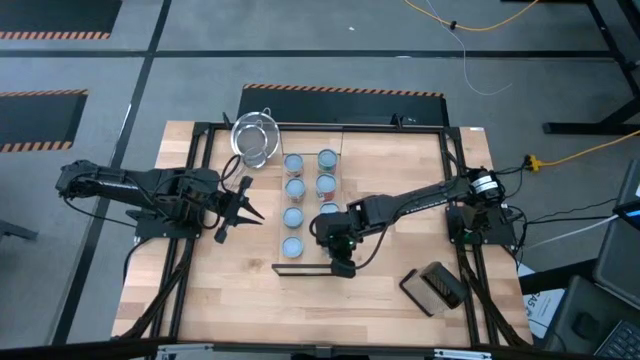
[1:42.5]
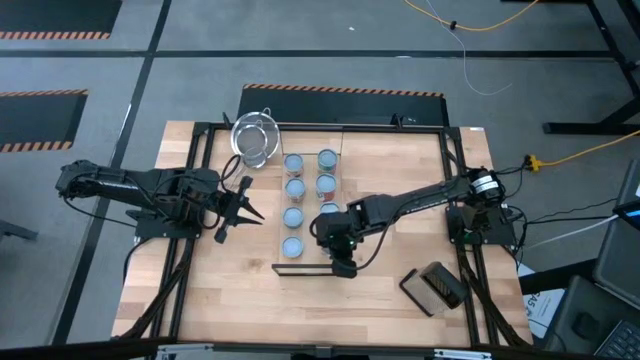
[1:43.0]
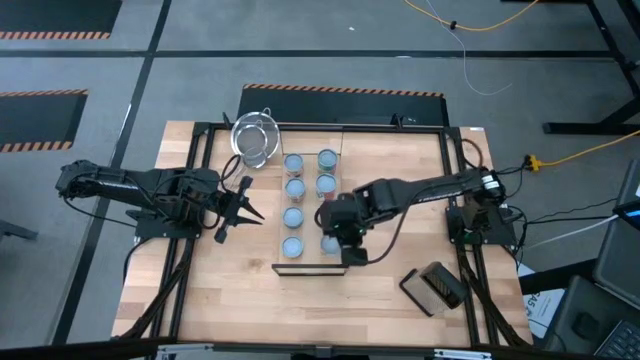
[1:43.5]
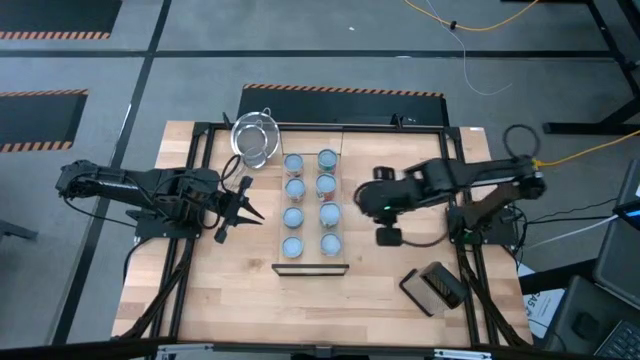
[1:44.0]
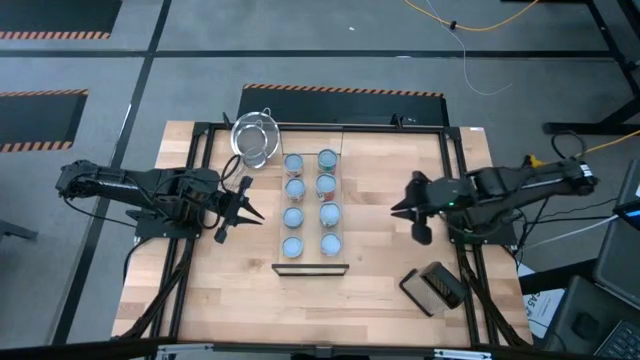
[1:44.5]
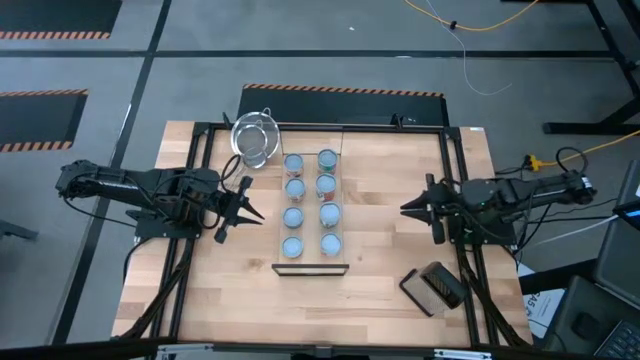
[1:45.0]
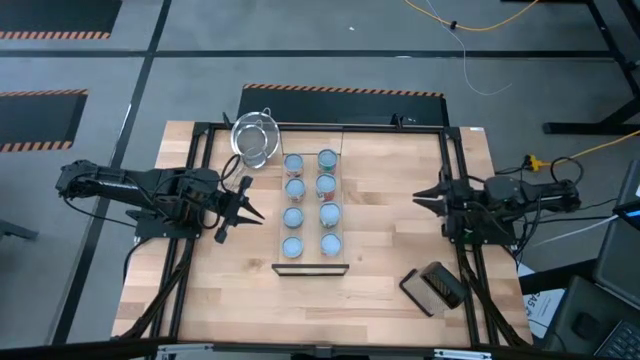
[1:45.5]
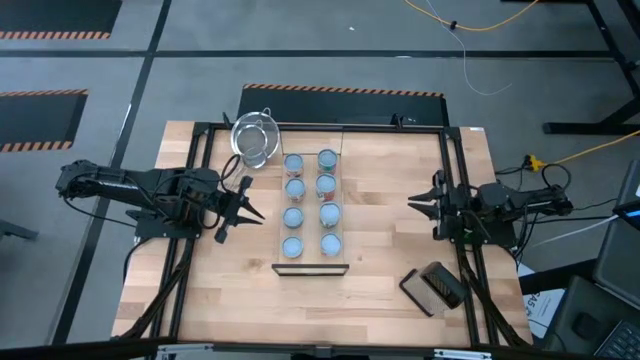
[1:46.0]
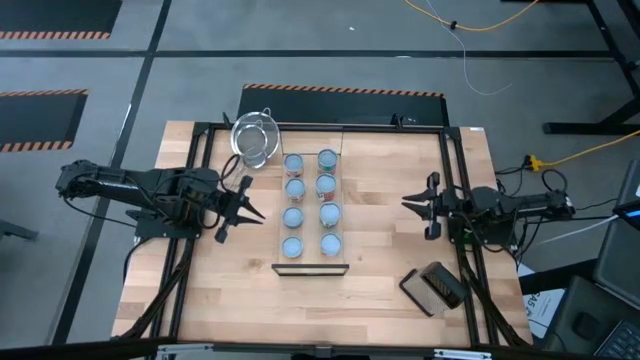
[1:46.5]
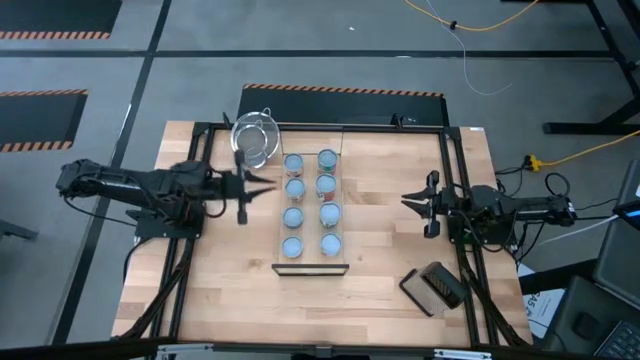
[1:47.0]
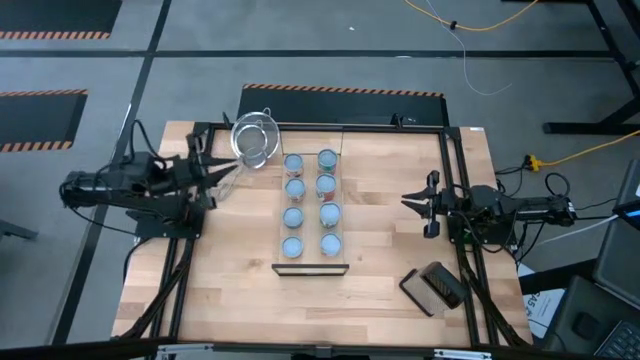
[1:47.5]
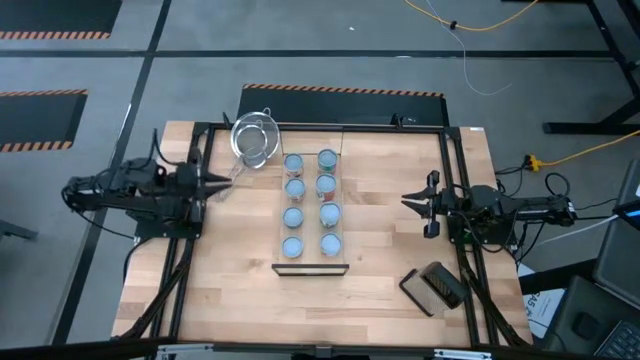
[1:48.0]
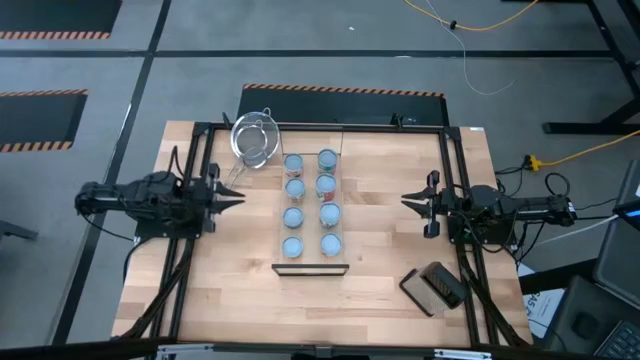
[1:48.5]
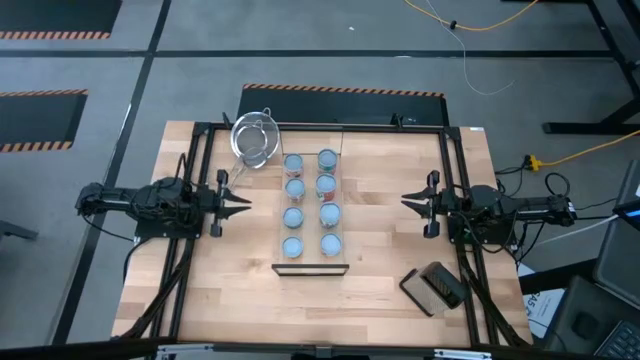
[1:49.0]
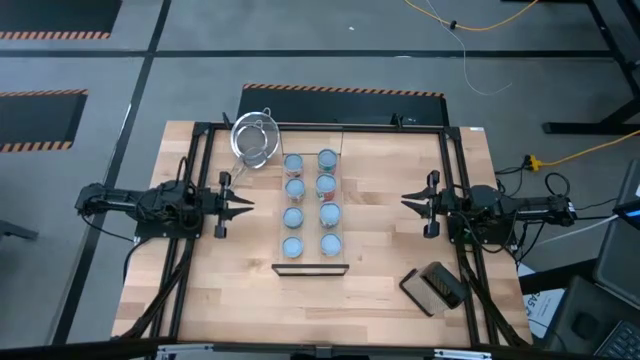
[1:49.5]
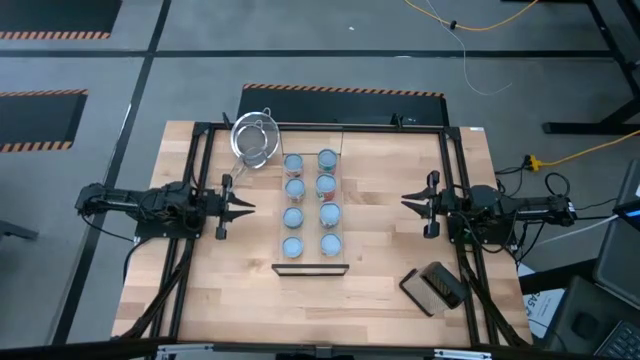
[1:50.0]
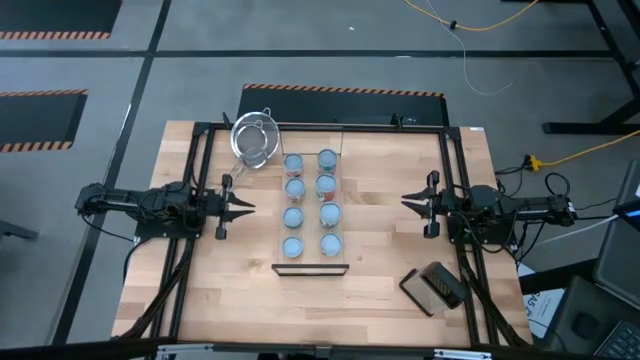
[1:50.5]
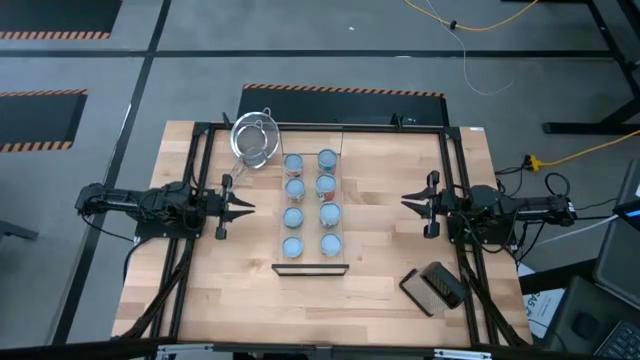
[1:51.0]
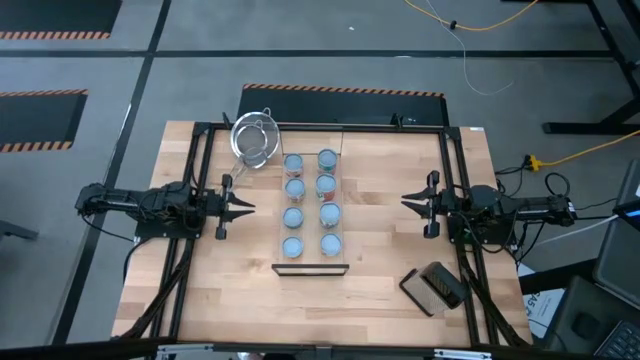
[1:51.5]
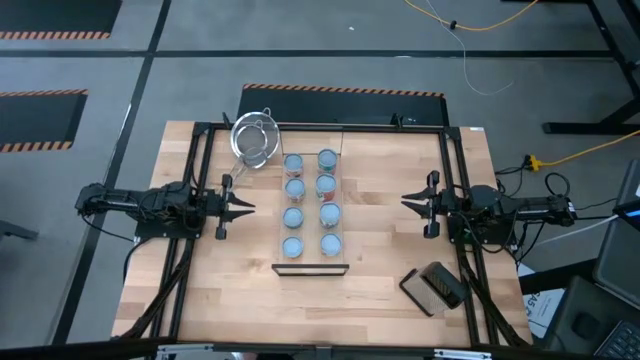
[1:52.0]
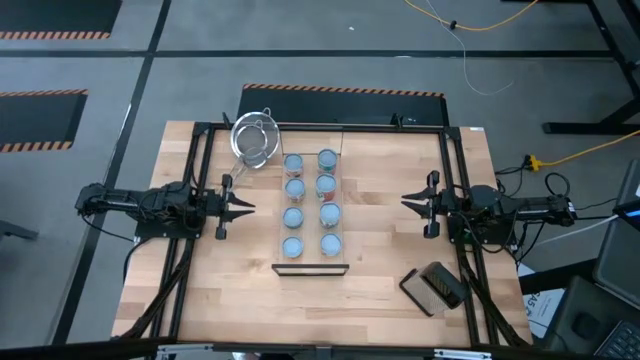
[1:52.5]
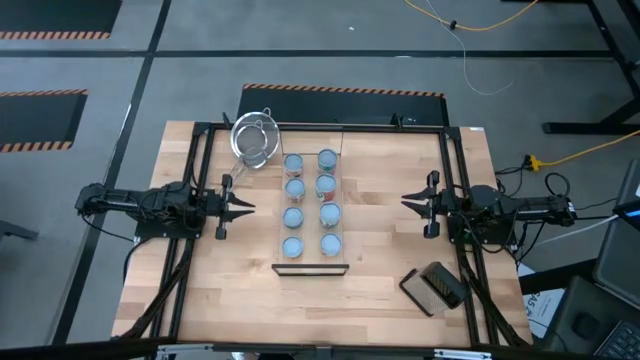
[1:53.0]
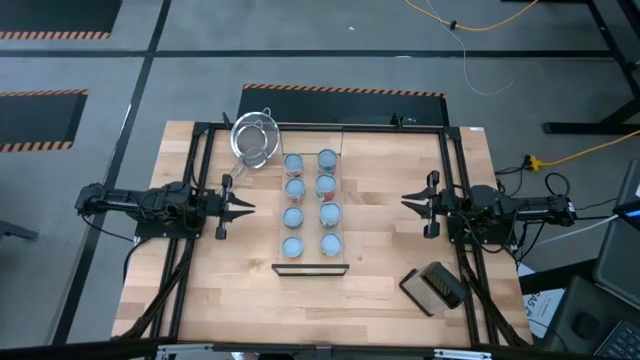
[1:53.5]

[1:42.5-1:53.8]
Task: Pick and place cans onto a shelf
Return to Home Position

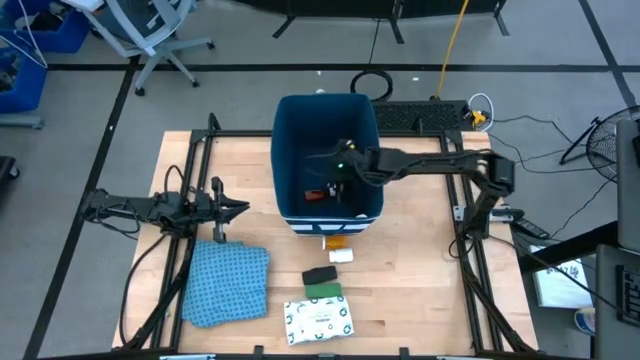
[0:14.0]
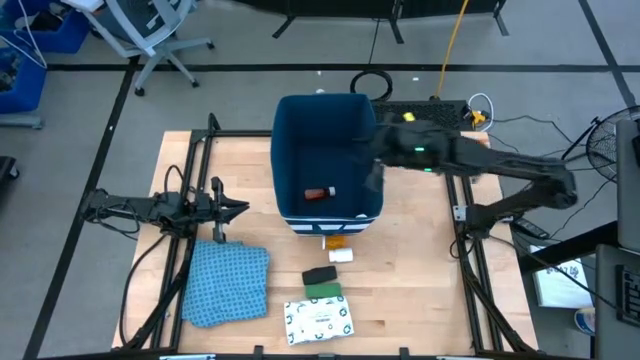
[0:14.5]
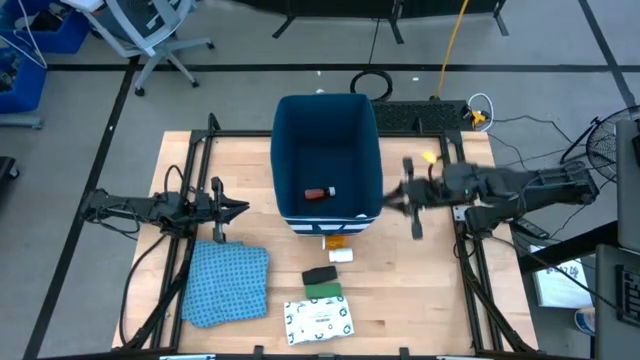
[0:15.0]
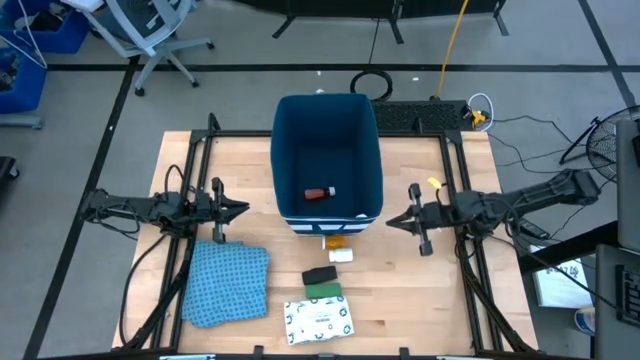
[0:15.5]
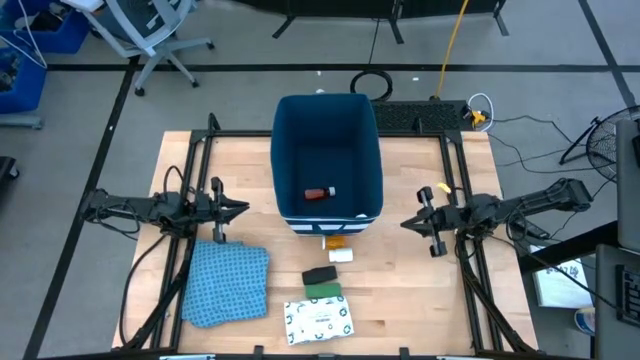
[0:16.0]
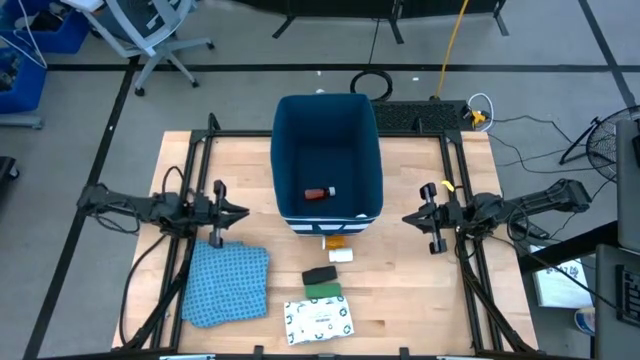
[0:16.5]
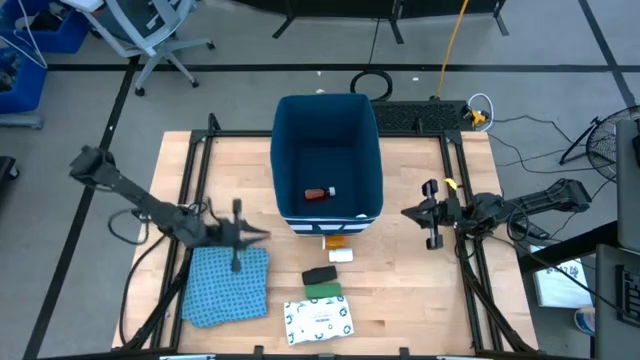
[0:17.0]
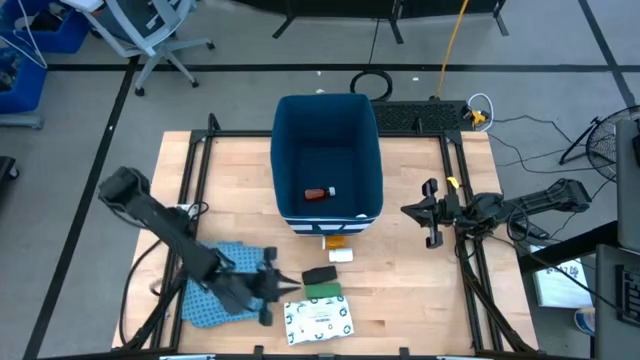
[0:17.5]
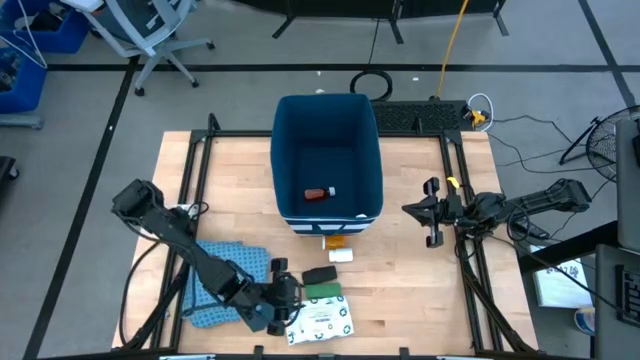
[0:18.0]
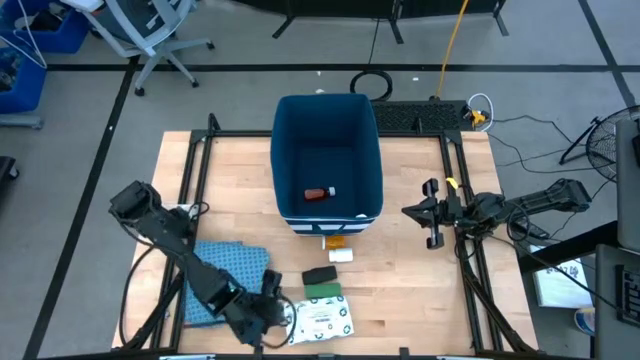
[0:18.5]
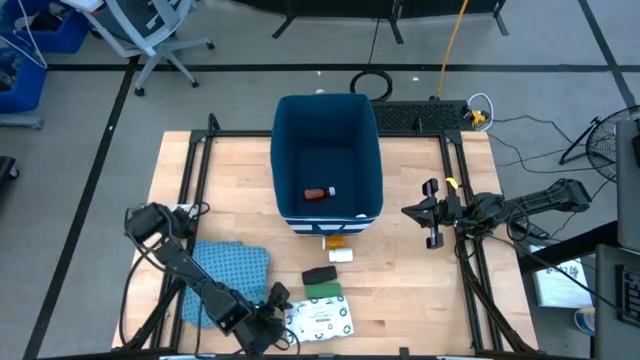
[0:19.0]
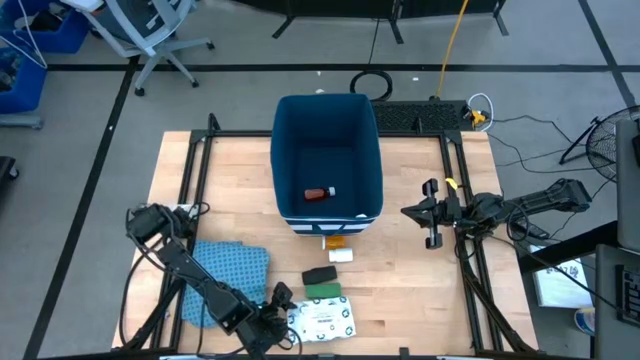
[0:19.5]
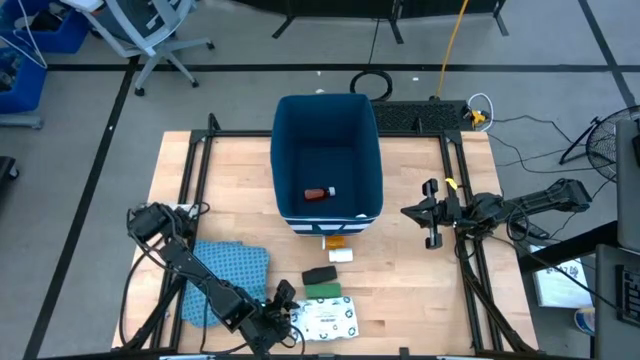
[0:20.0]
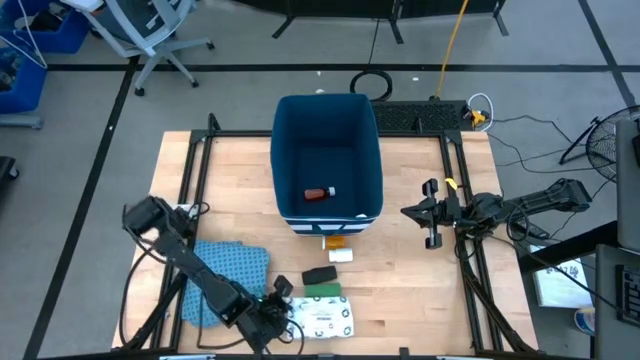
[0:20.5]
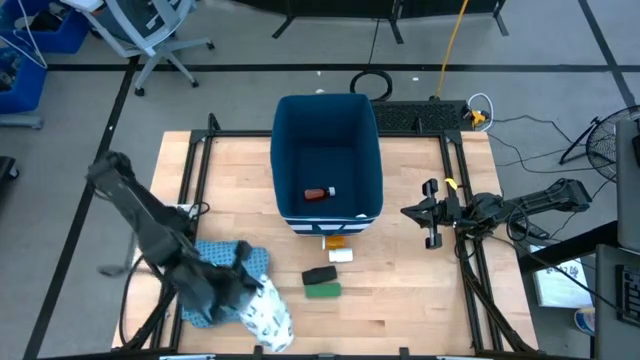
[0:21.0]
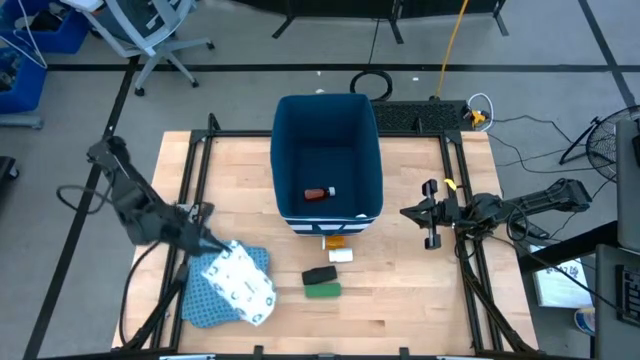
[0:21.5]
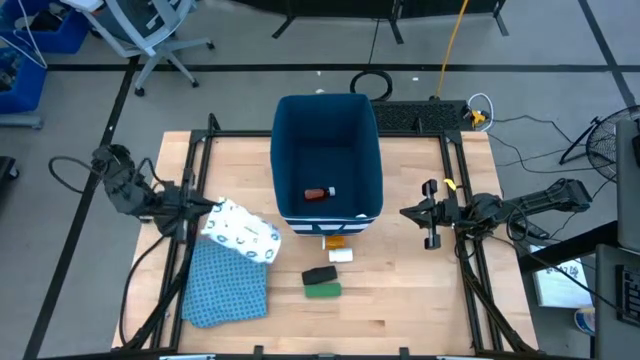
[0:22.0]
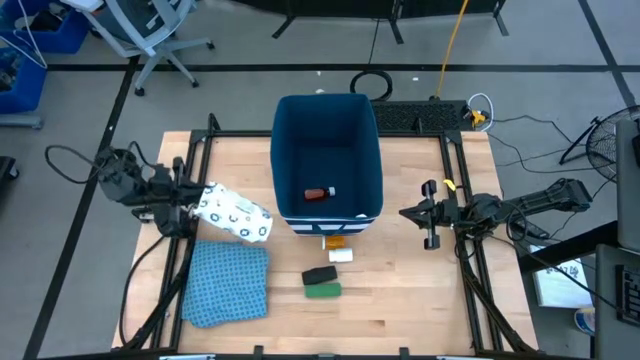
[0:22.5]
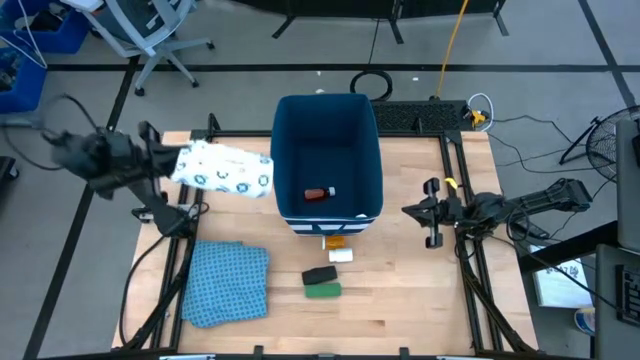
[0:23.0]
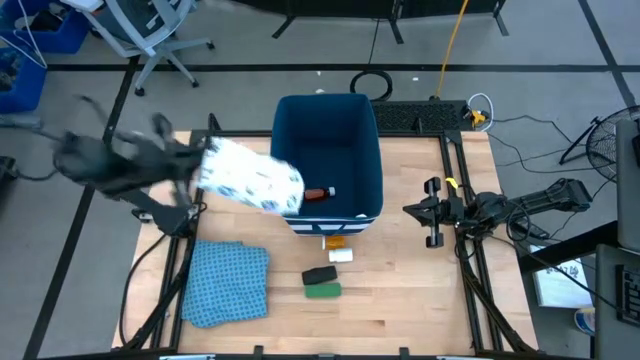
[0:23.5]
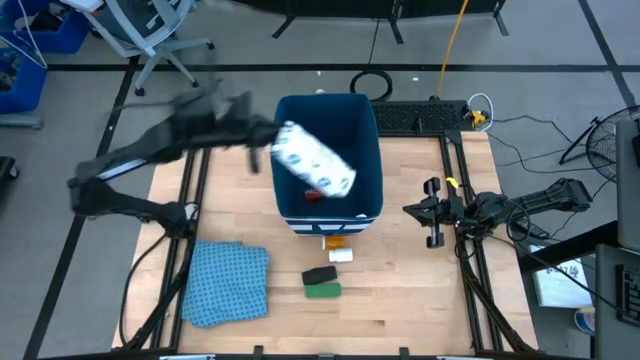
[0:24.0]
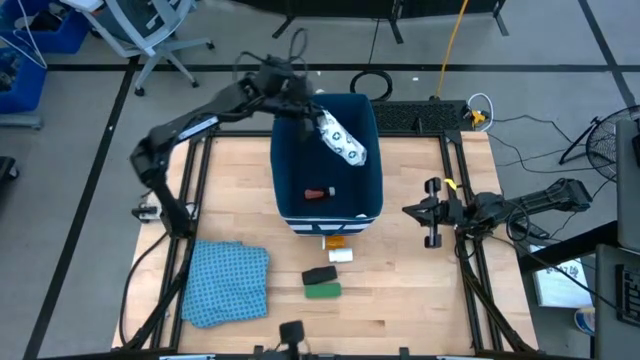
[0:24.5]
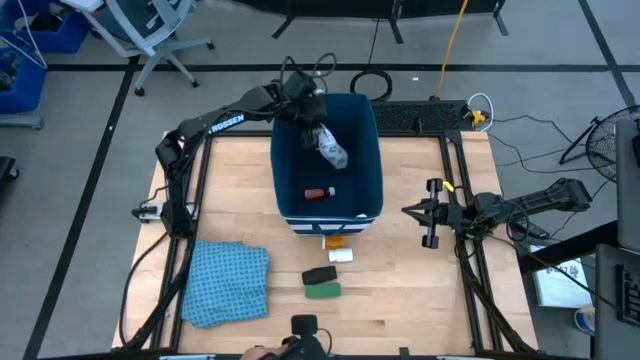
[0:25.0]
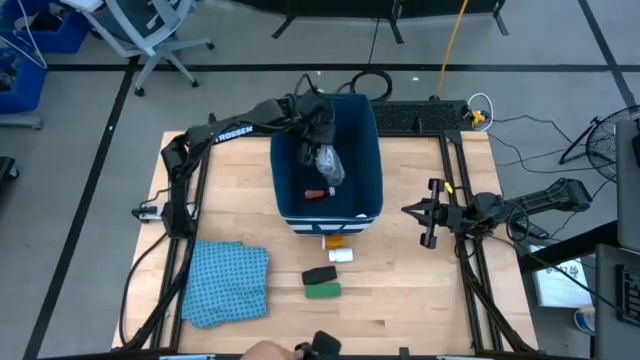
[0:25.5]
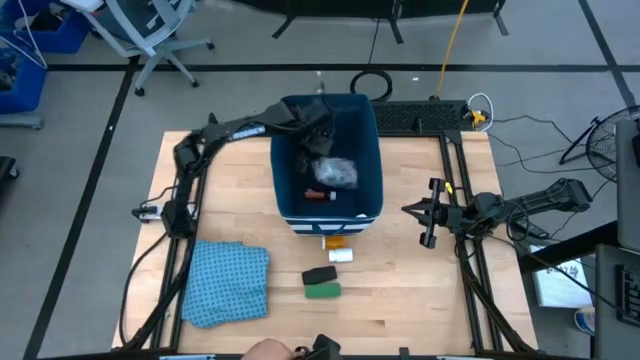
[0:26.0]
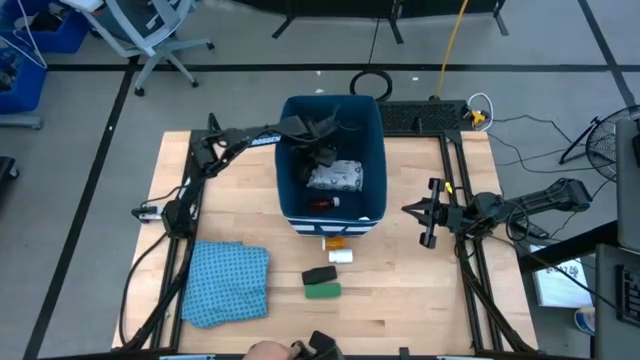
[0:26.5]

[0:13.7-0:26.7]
Task: Pick & place medical supplies in basket/bin
Put the mailer bag into the blue bin
